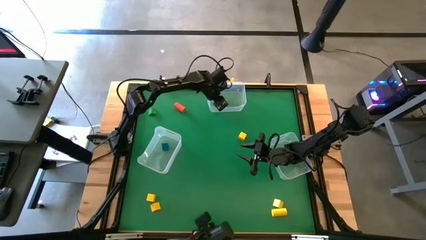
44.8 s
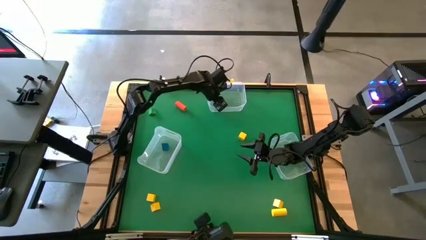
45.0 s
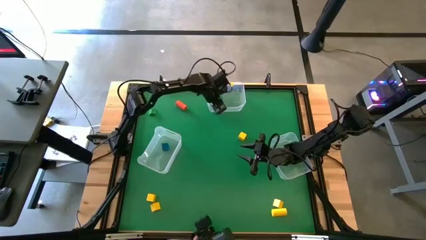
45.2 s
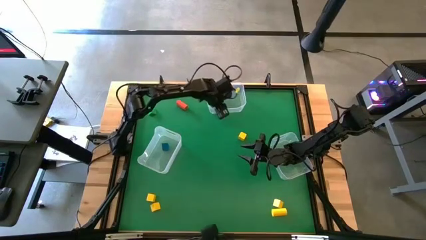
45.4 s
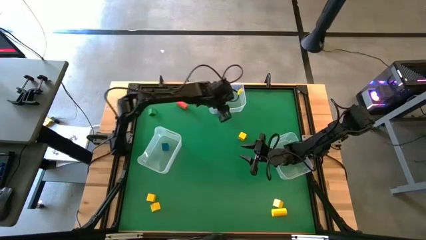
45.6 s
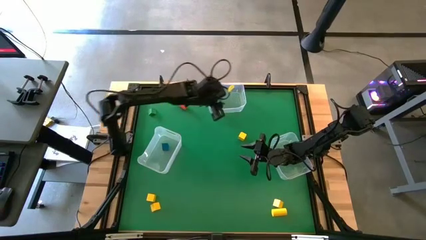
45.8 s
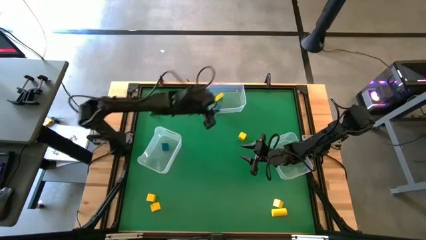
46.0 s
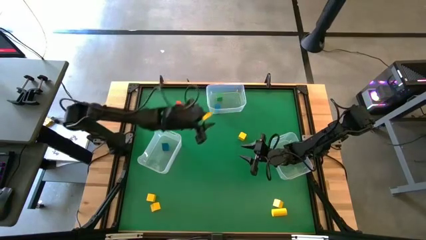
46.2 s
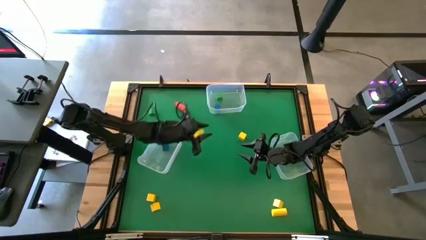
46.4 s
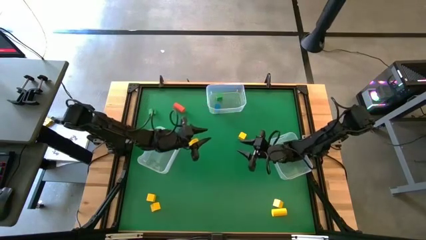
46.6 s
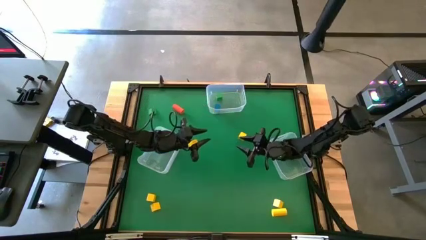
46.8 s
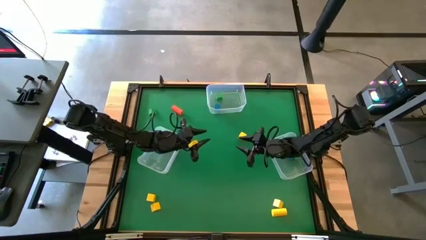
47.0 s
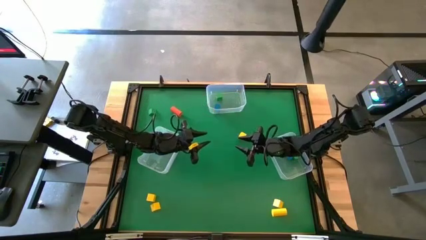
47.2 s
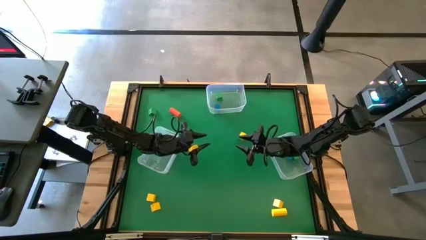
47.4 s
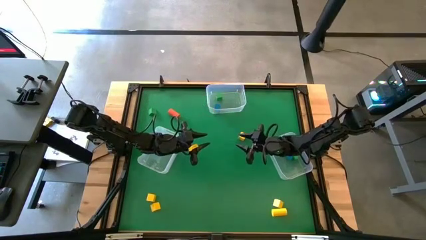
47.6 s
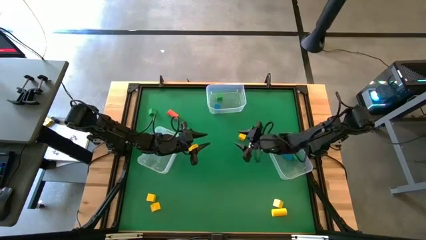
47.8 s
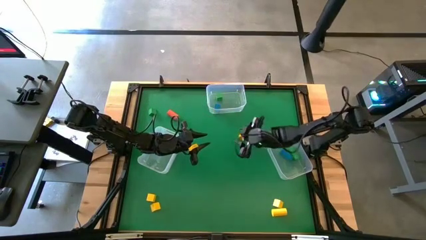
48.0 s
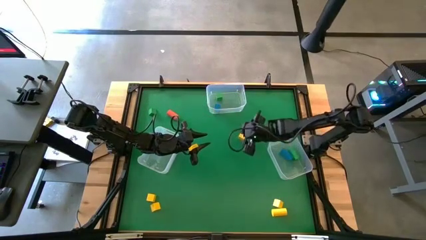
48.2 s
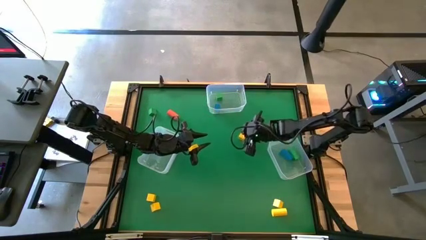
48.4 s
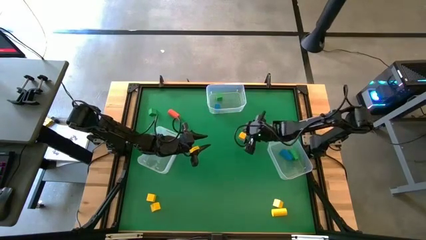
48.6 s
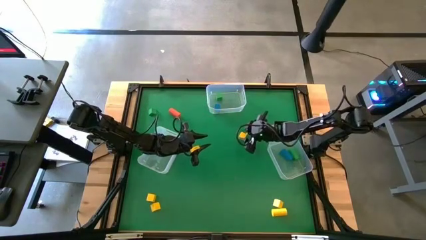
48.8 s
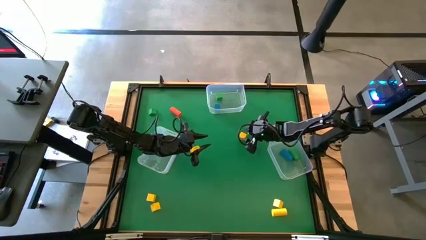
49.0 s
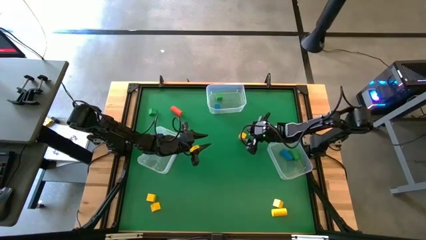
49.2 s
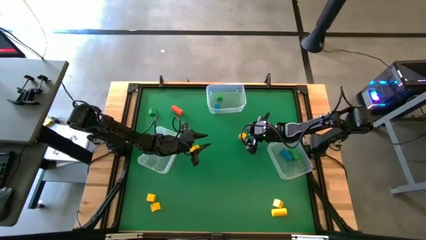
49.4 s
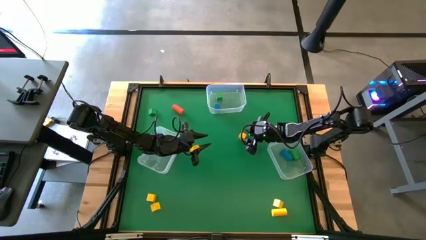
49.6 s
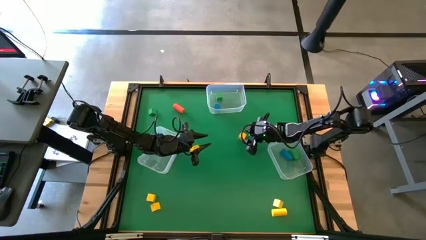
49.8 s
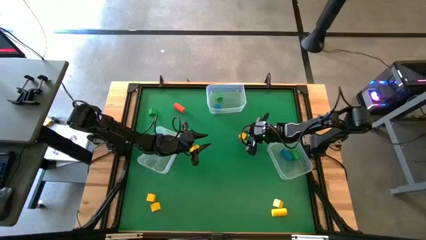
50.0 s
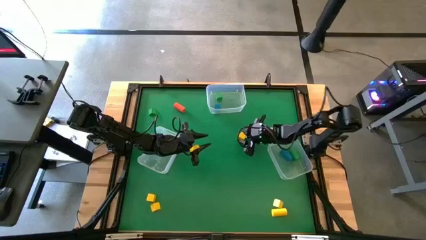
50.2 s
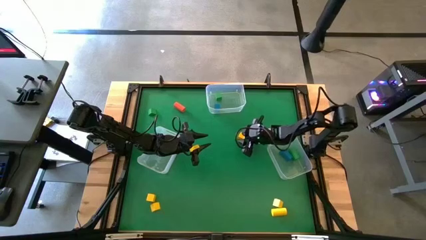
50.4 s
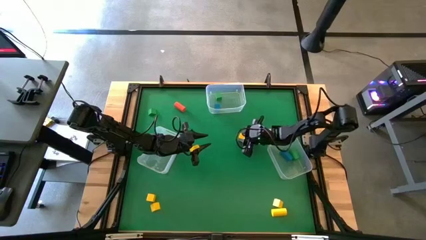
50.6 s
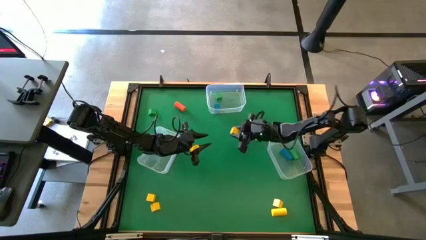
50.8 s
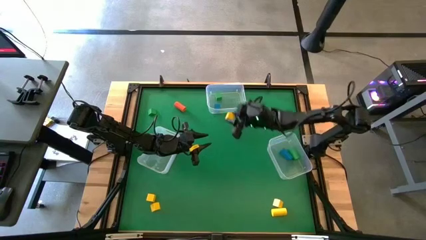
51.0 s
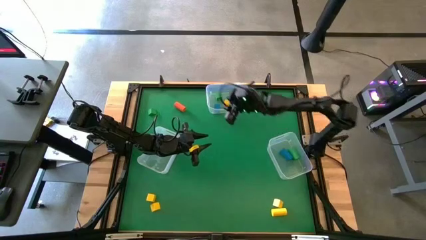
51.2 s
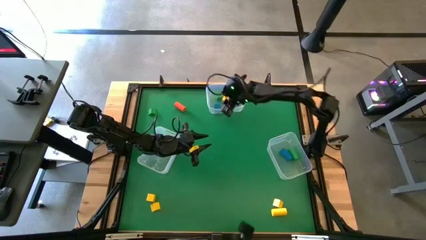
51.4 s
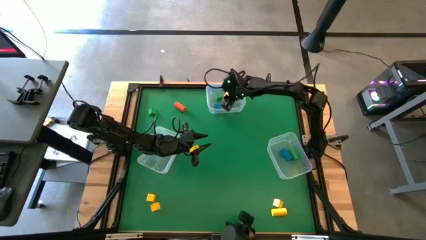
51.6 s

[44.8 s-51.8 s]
Task: Sort blocks by size
Put the yellow cube block into the top transparent bin

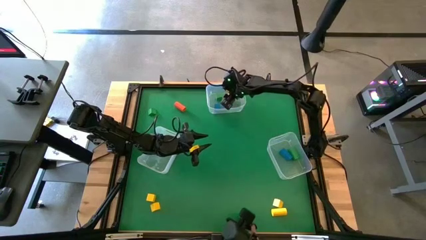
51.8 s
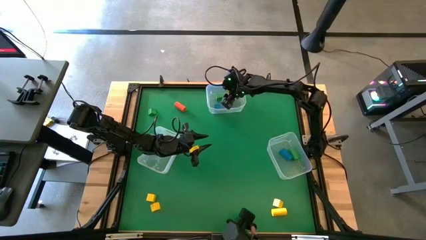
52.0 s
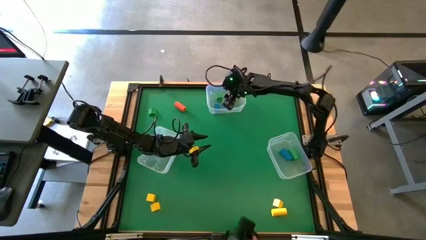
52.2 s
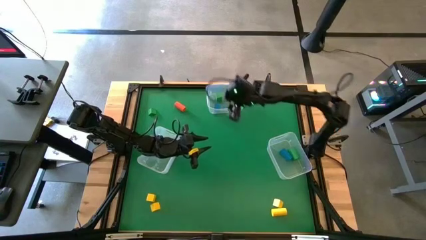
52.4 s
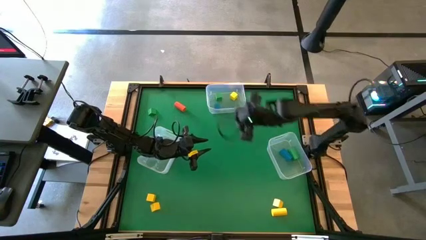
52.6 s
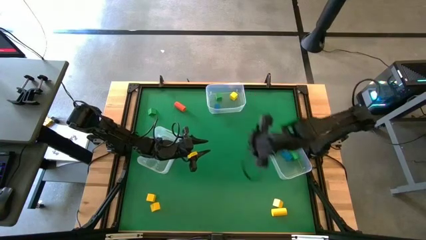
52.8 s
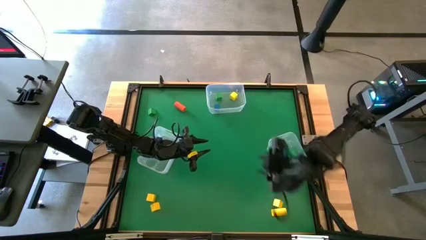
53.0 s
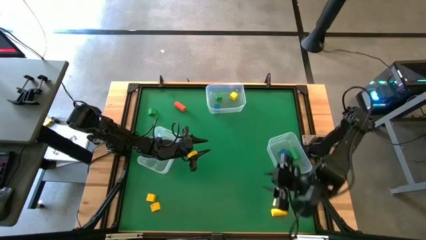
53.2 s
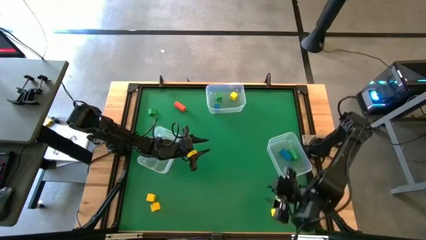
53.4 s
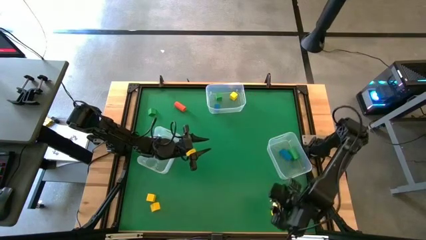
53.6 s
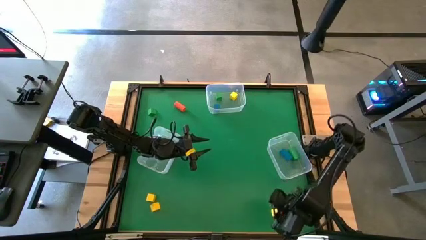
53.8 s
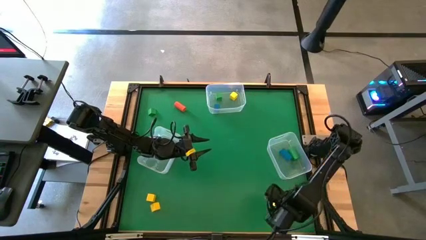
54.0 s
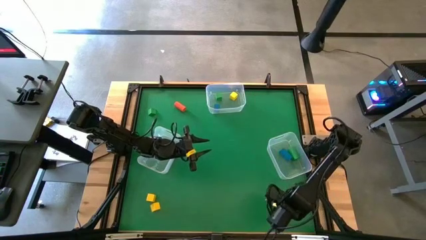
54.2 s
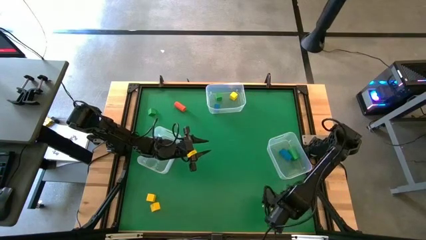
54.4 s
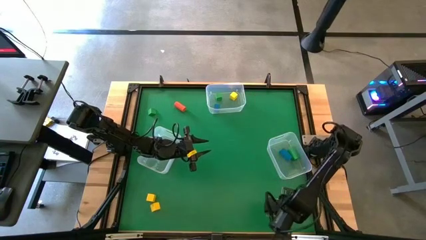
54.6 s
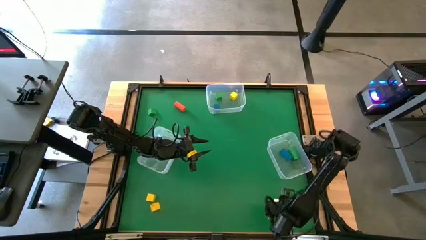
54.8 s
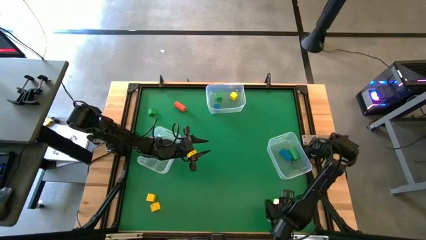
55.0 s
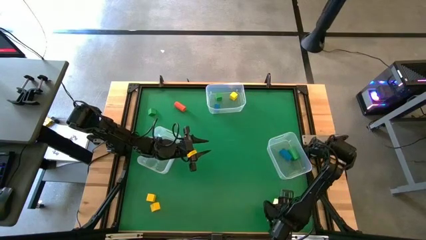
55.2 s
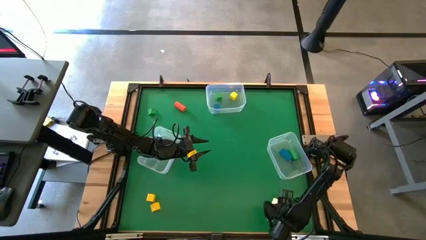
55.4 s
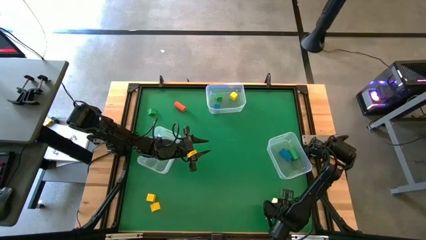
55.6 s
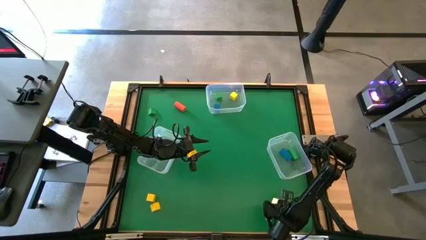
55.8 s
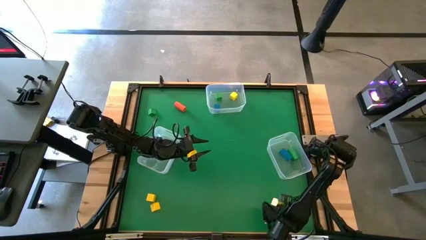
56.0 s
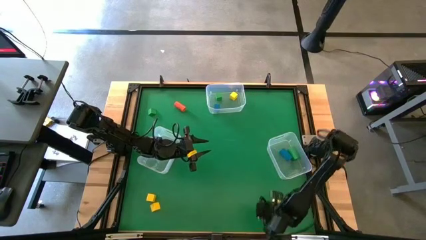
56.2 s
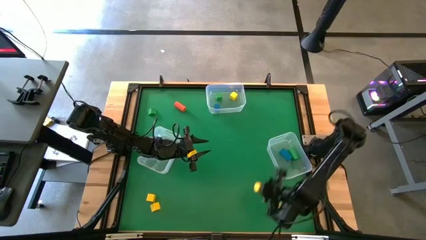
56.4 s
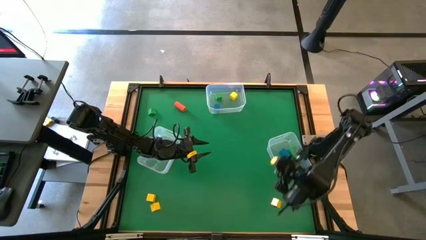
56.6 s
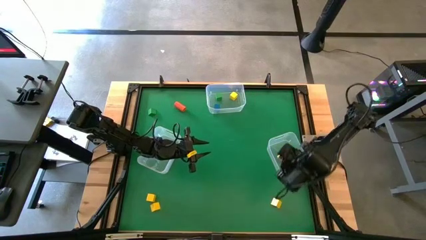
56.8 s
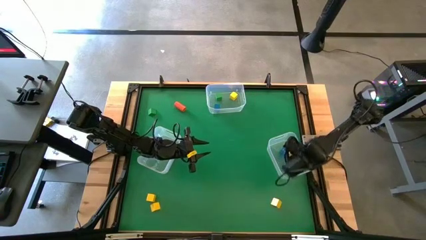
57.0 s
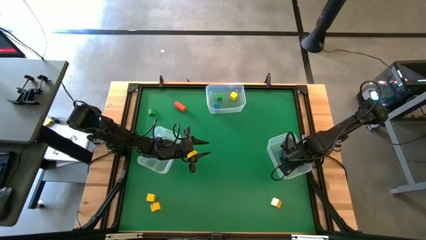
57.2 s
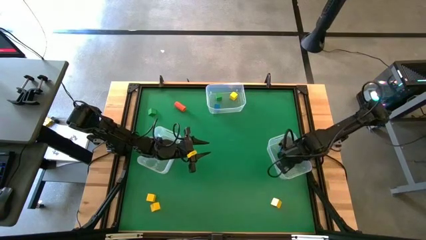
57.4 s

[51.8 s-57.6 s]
Put the yellow cylindrical block into the bottom right transparent bin

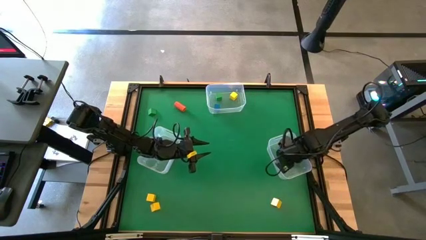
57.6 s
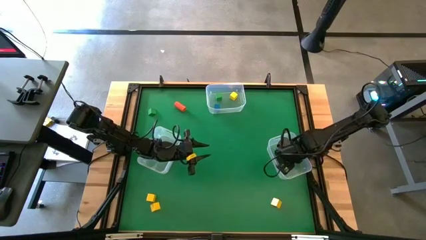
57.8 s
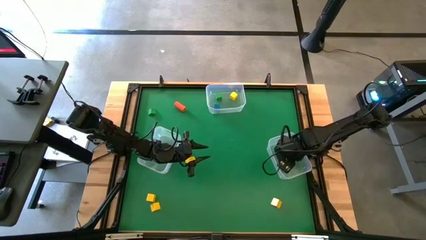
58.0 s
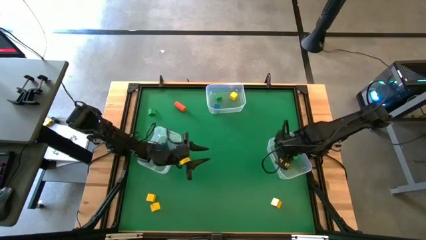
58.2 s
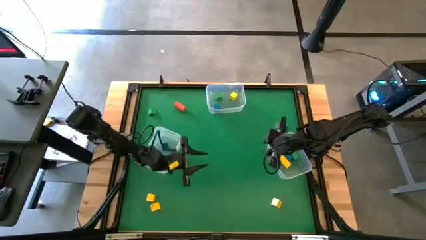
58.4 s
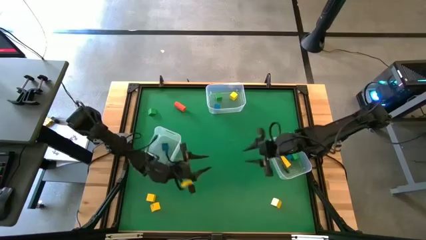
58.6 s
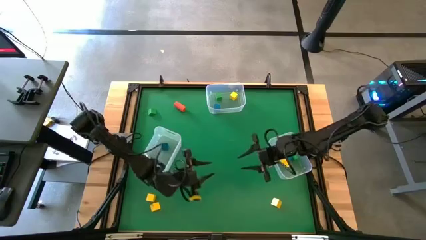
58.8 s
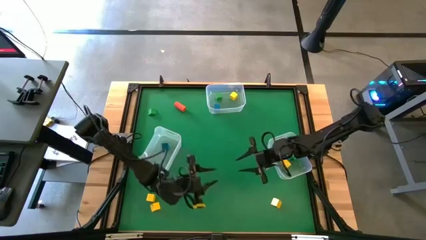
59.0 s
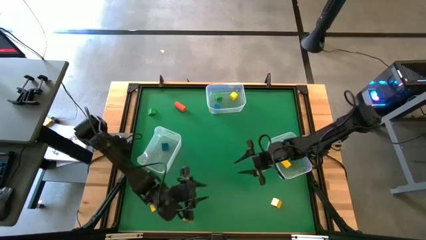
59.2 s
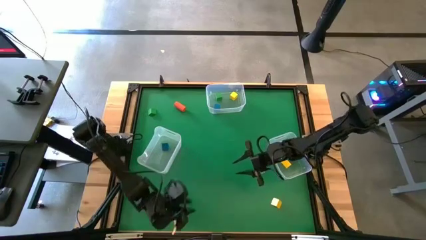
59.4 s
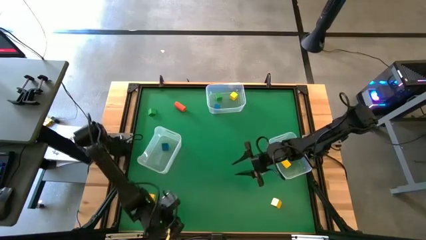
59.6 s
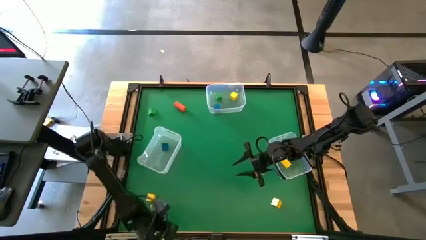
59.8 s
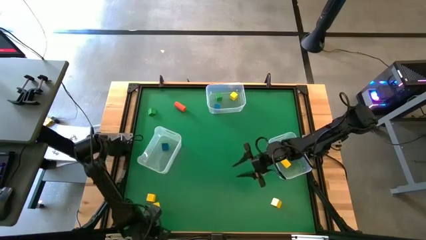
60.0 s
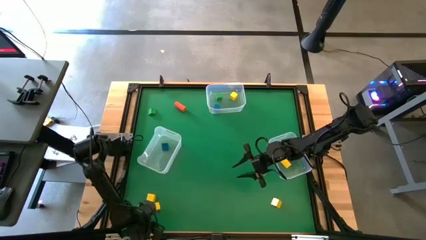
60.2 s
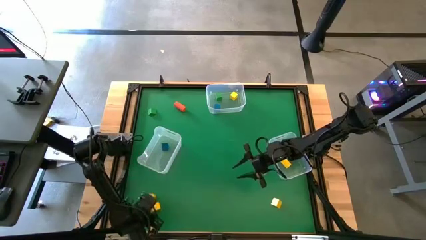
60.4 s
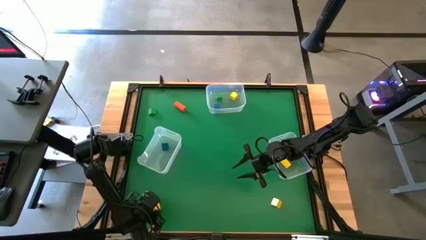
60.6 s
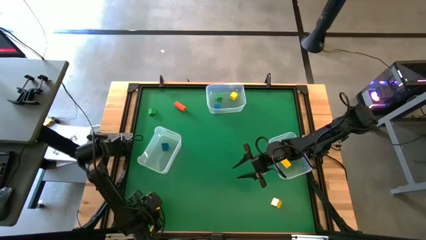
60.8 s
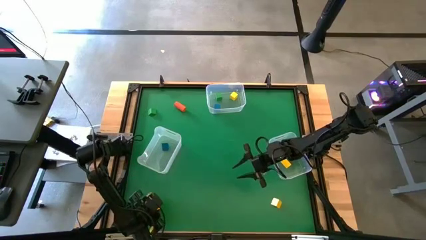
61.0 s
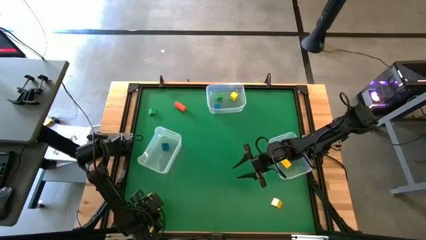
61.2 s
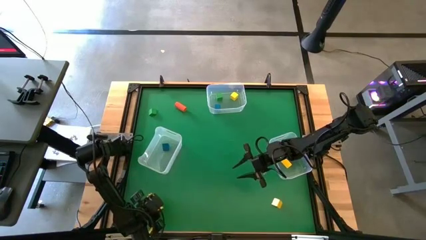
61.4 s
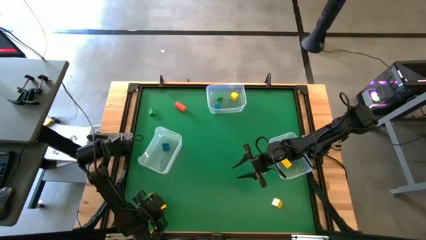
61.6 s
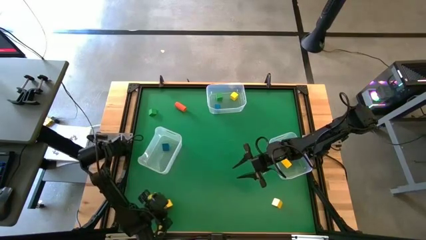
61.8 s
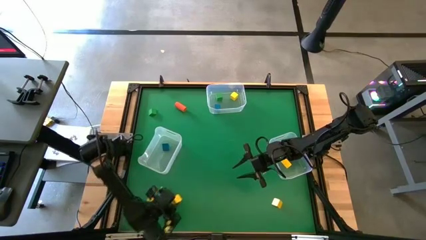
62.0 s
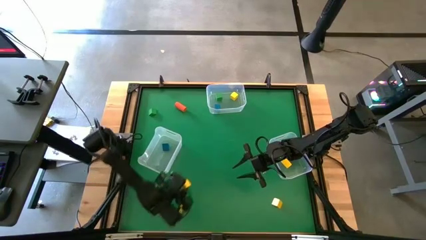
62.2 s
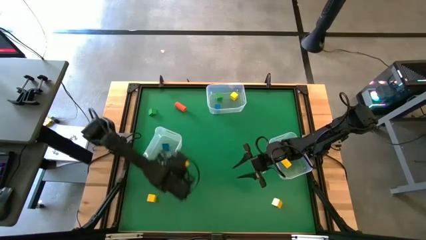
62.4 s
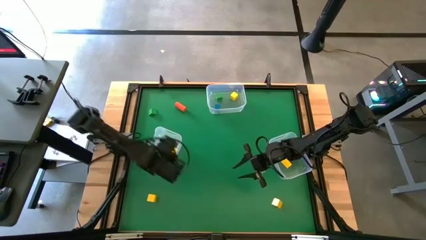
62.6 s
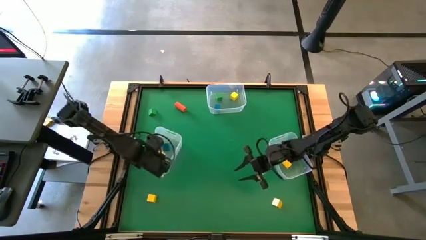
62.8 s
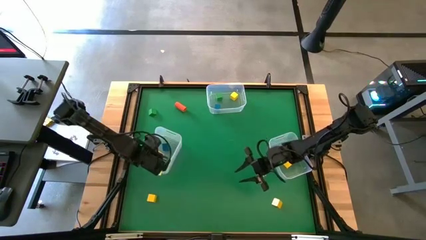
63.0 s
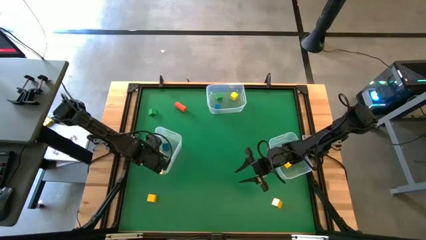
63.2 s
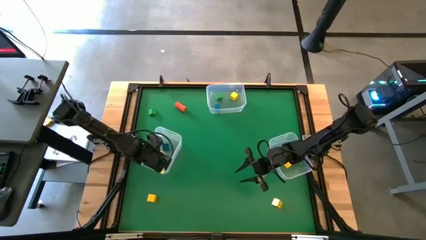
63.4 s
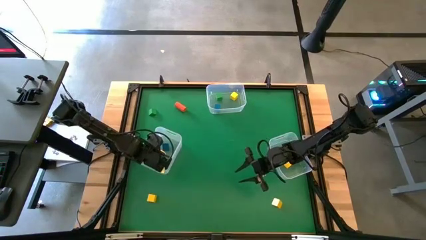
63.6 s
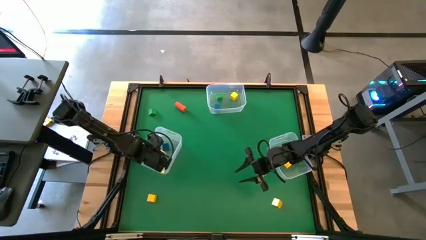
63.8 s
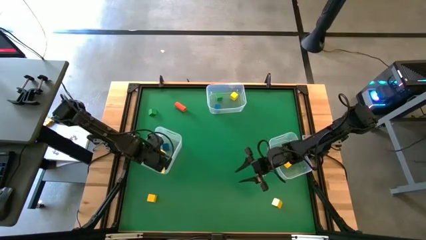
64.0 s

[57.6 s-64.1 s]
Put the yellow triangular block into the bottom left transparent bin
